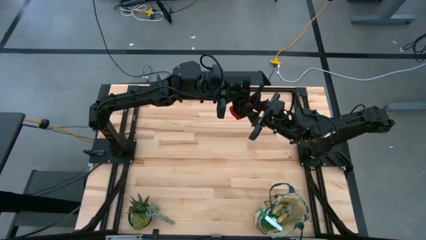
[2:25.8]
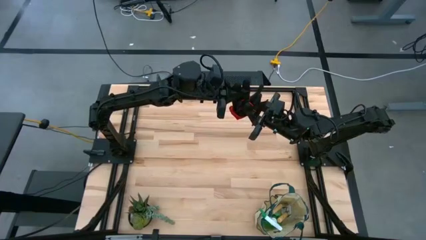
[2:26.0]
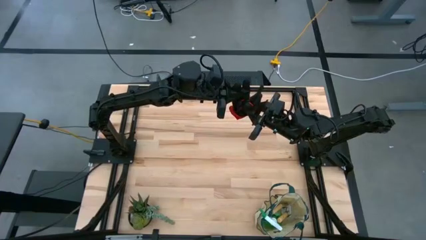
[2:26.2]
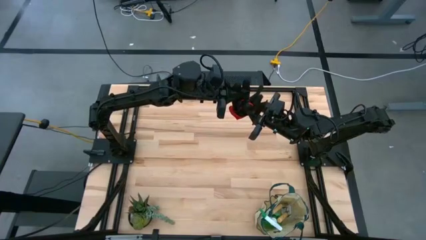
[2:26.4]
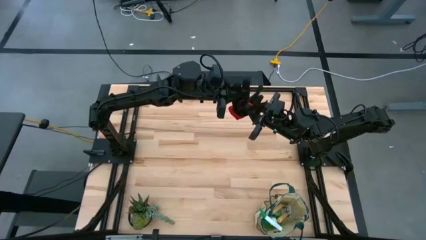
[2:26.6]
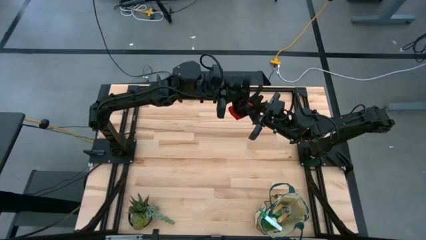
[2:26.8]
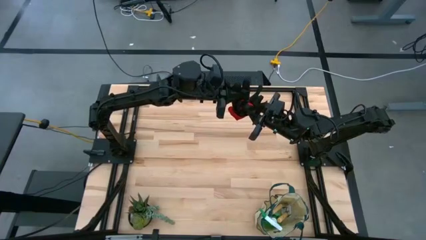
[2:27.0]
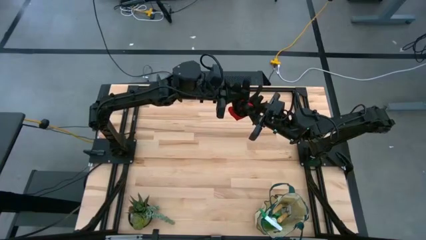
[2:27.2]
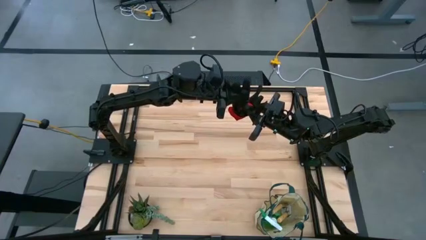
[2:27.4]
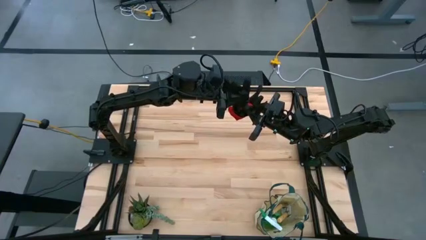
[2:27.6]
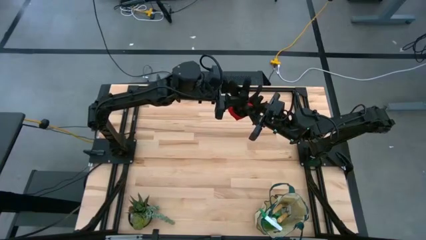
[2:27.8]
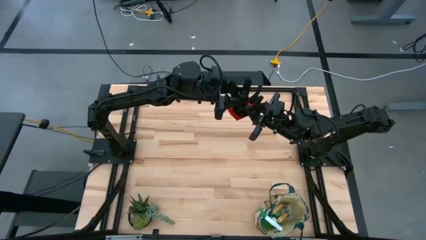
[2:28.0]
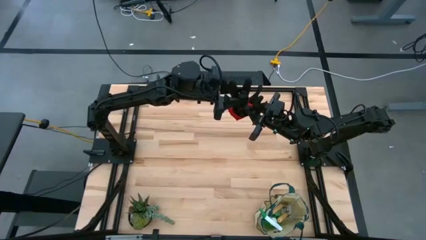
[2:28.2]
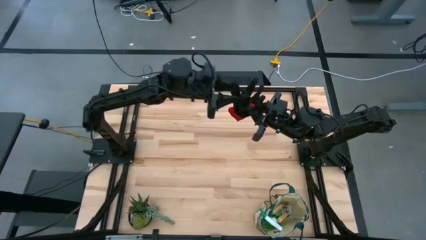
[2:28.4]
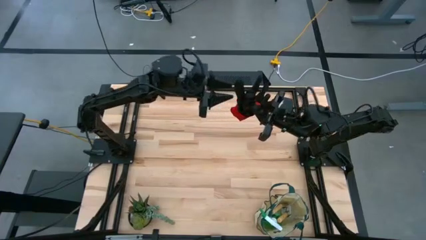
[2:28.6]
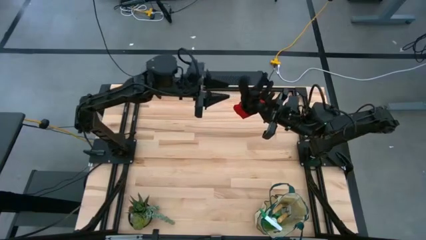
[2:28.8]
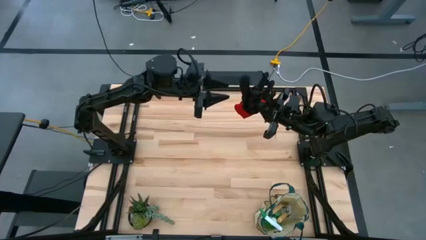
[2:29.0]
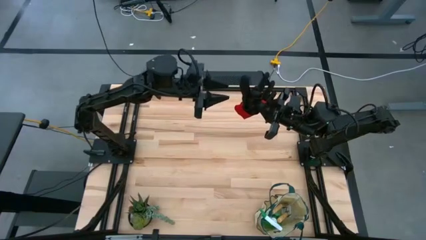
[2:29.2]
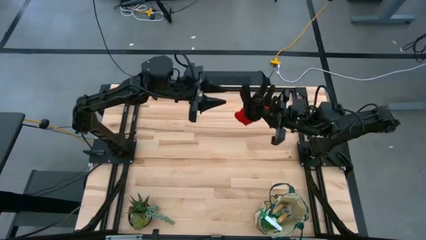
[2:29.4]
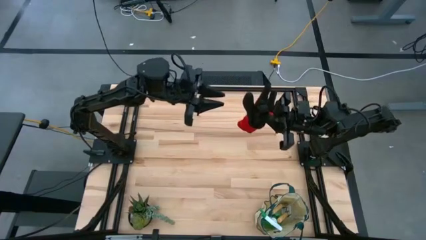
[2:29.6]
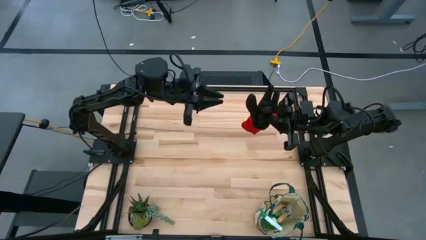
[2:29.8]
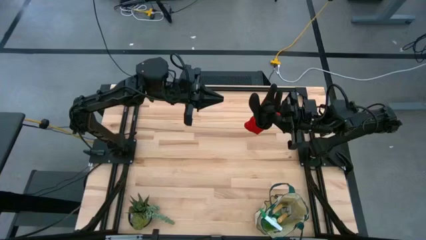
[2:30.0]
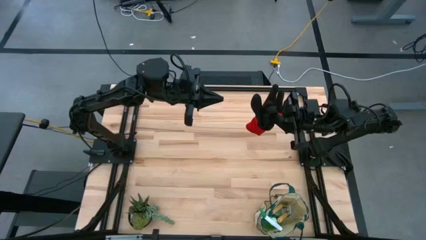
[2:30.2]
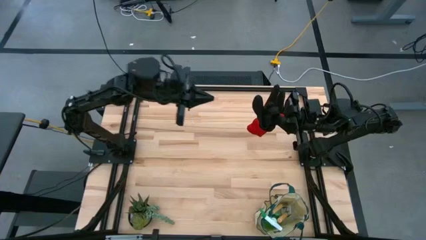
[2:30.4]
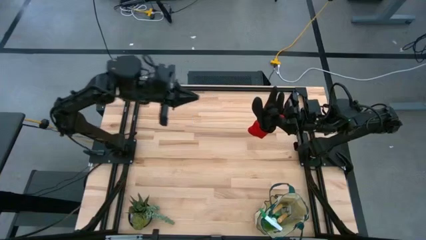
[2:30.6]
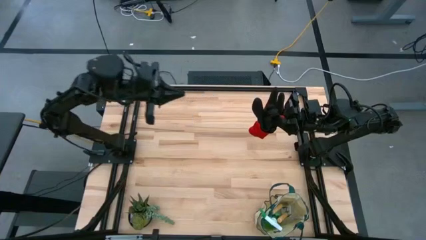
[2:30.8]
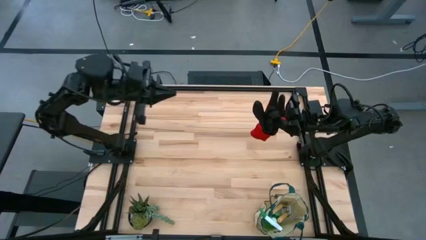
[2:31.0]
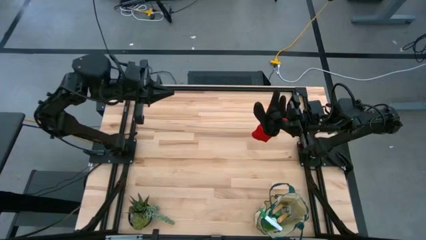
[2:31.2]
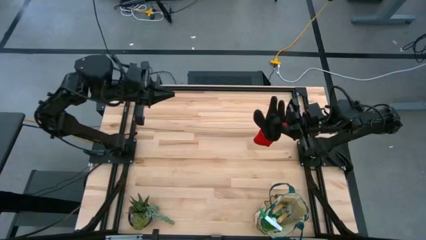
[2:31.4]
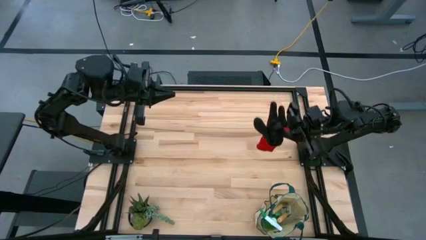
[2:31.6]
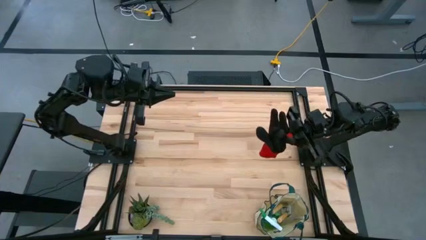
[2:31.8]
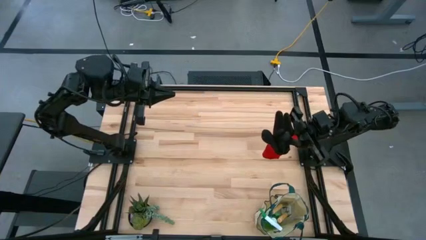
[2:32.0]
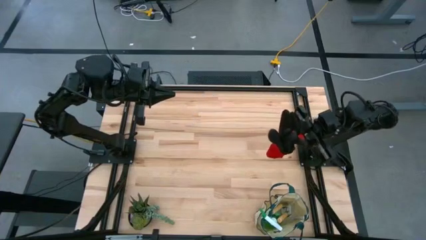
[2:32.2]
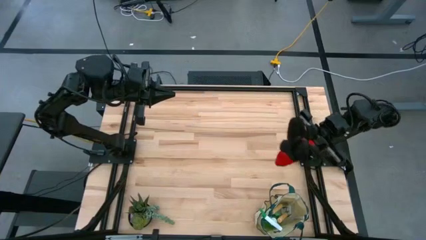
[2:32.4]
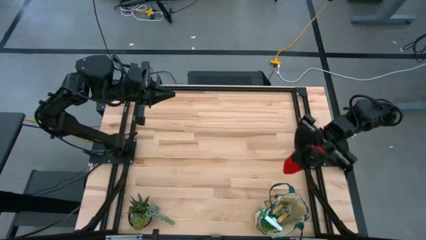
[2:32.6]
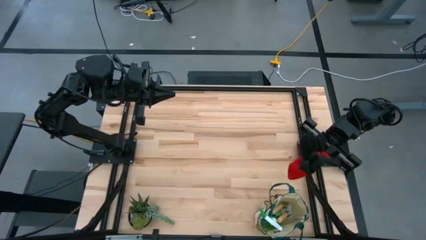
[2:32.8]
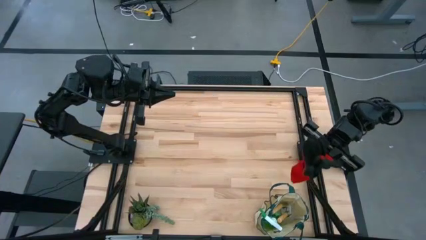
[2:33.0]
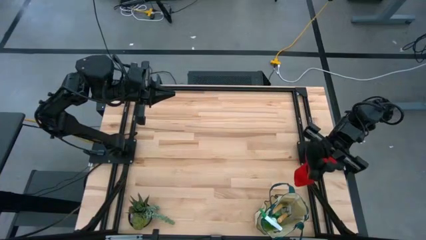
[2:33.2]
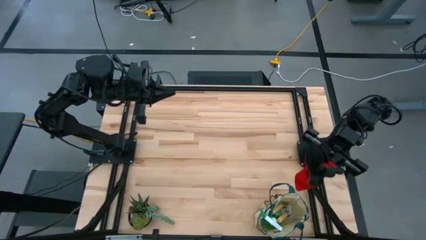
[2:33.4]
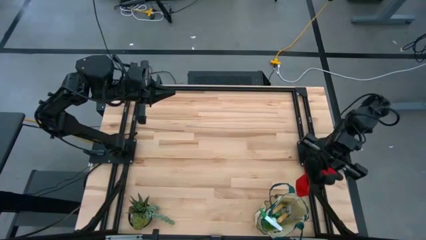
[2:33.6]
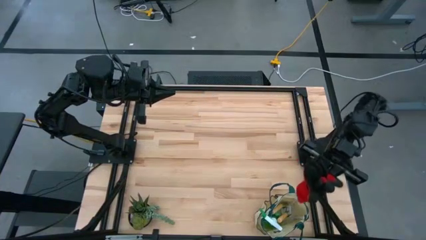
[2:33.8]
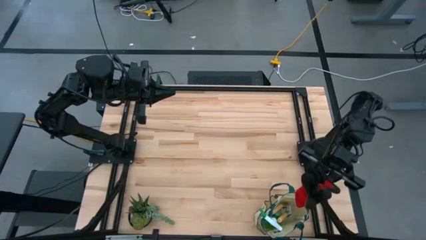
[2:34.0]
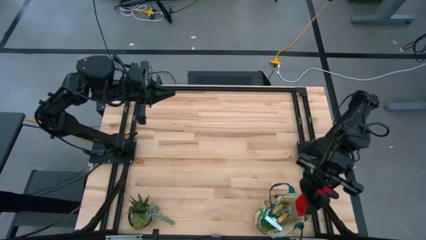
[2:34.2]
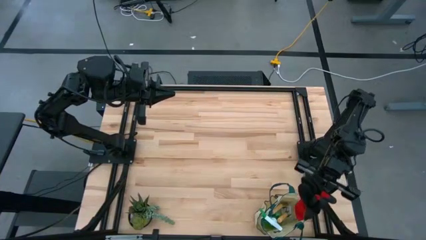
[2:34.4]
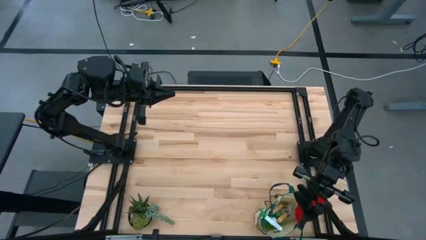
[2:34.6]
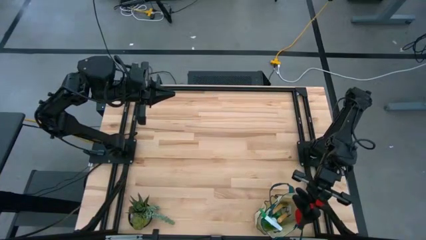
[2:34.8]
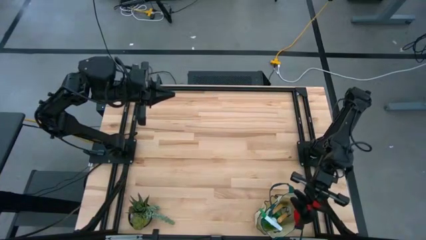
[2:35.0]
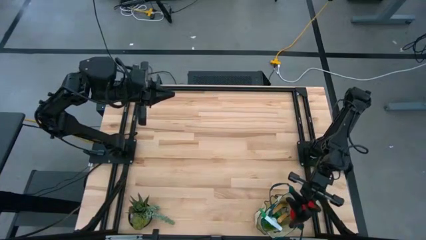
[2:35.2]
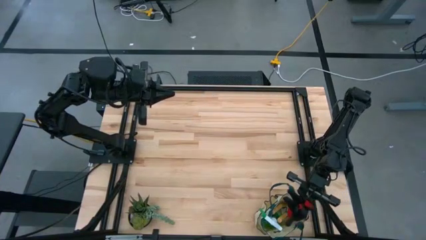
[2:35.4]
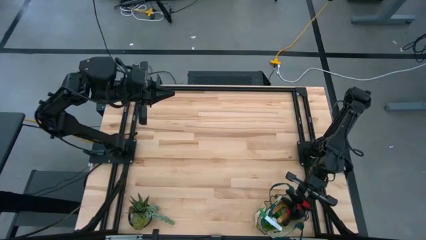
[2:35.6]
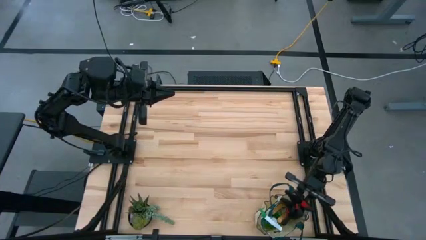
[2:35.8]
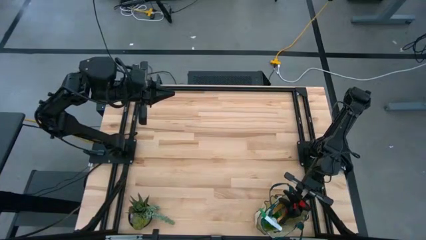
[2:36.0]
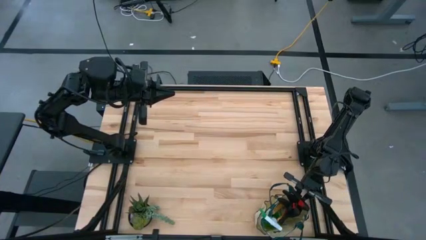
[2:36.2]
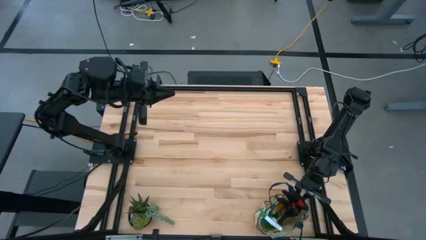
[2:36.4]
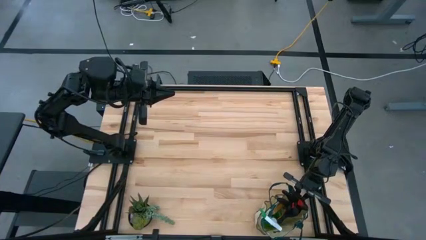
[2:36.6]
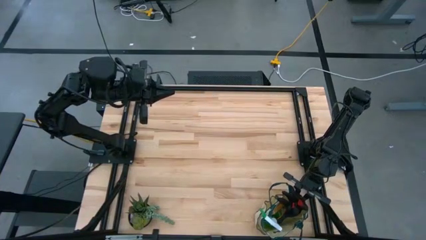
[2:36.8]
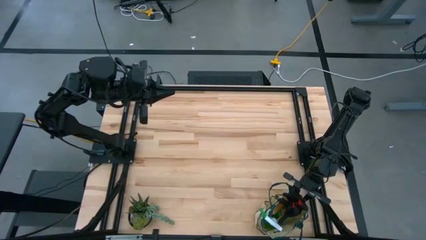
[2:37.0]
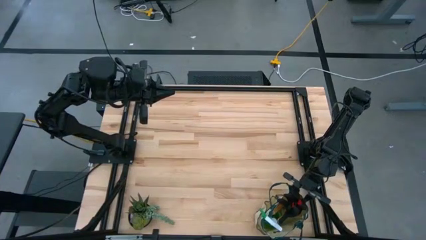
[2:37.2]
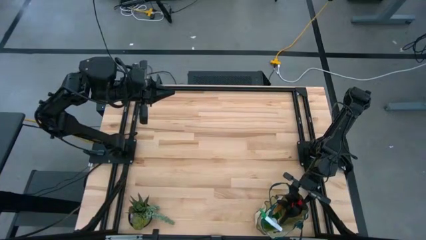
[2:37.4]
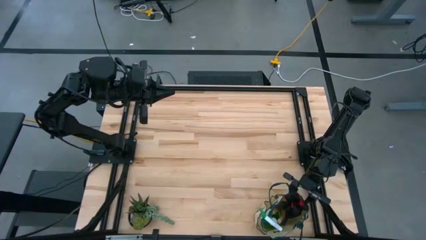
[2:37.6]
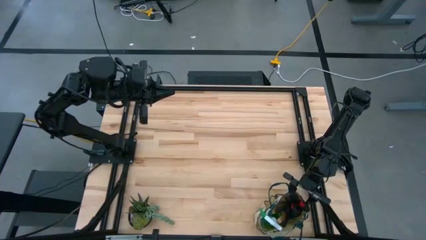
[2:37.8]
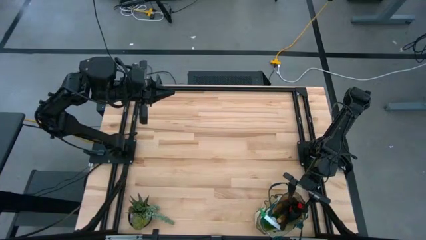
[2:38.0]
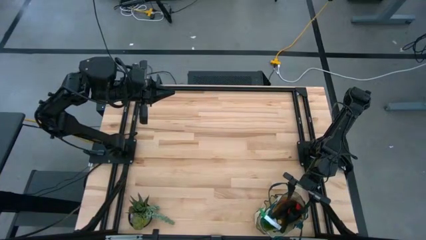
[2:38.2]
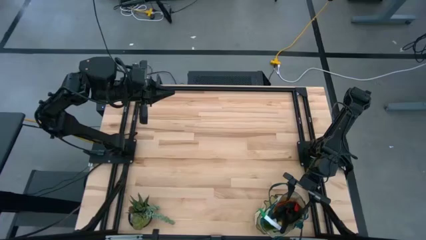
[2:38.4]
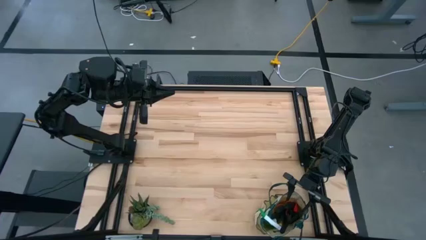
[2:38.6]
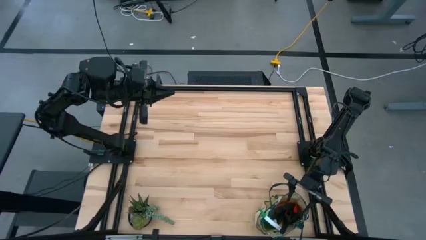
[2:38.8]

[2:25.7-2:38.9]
Task: Pick & Place Garden tools in Gardening bag
Put the black gloves into the gardening bag

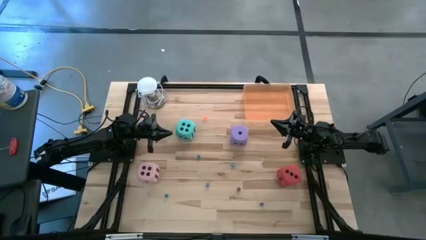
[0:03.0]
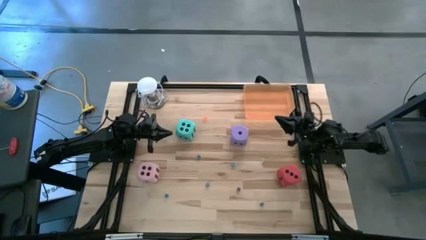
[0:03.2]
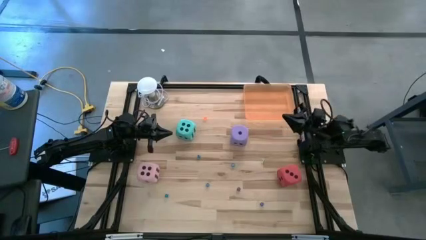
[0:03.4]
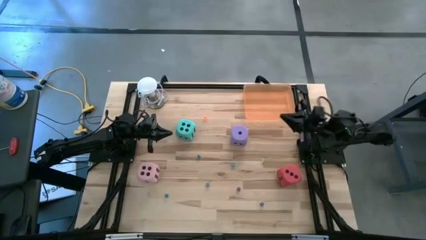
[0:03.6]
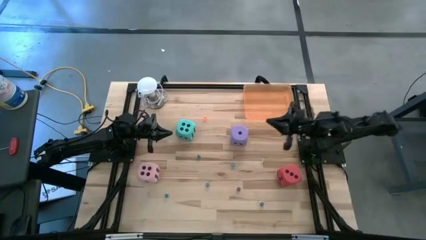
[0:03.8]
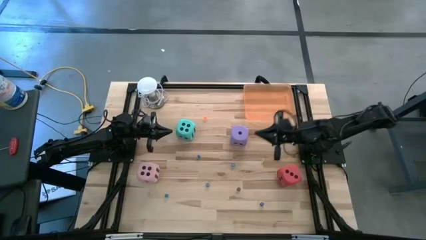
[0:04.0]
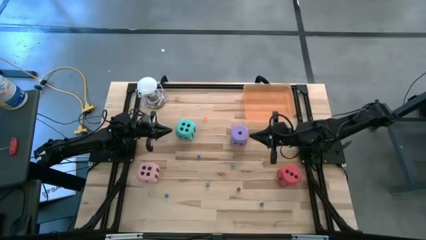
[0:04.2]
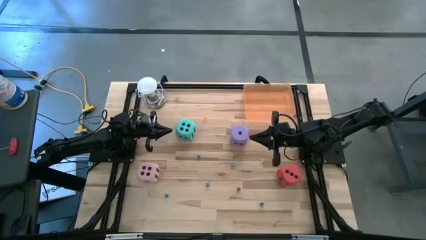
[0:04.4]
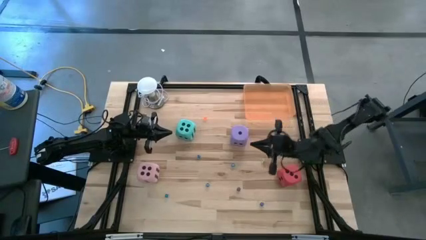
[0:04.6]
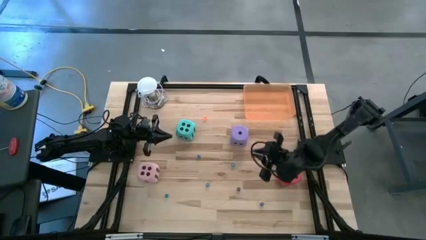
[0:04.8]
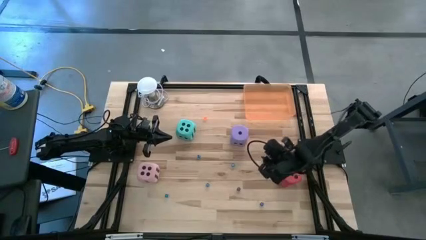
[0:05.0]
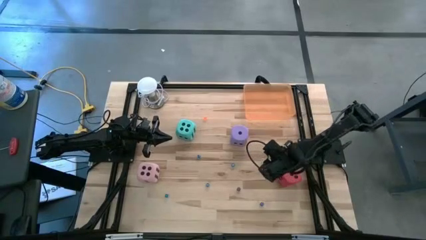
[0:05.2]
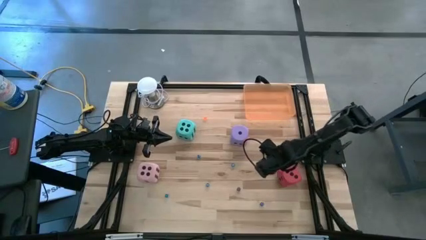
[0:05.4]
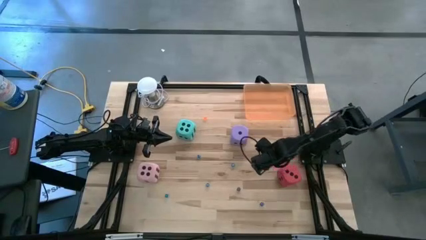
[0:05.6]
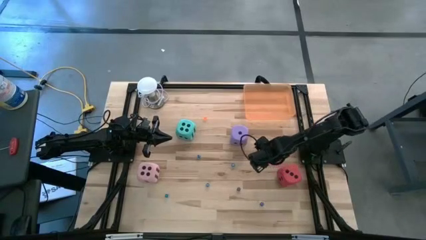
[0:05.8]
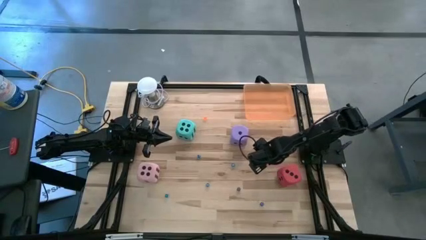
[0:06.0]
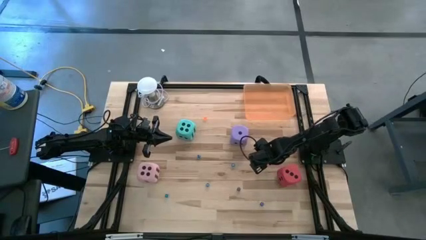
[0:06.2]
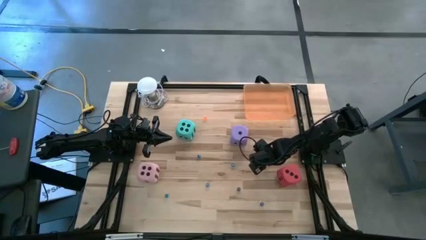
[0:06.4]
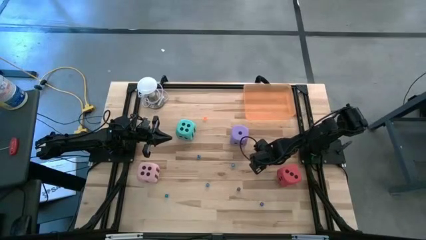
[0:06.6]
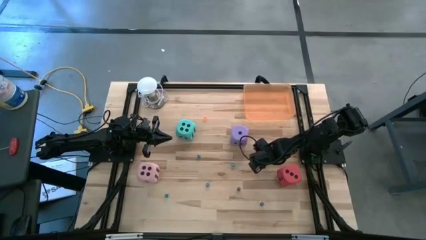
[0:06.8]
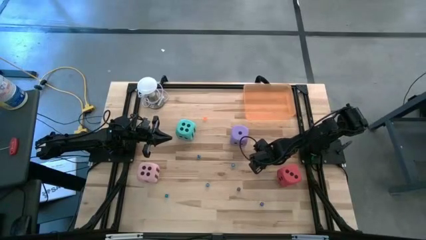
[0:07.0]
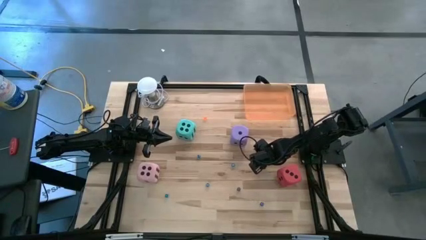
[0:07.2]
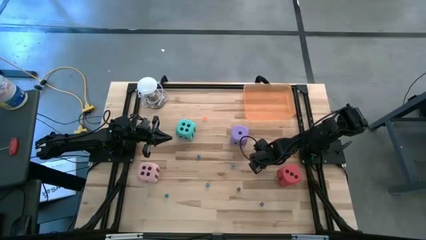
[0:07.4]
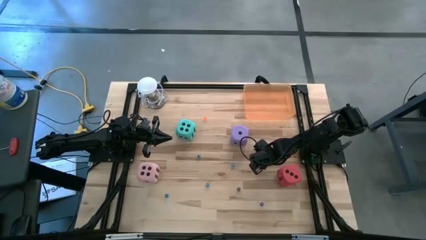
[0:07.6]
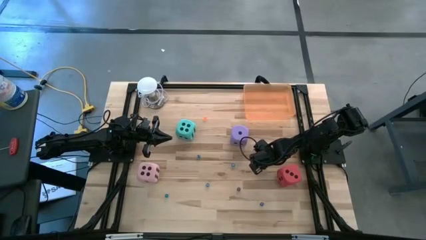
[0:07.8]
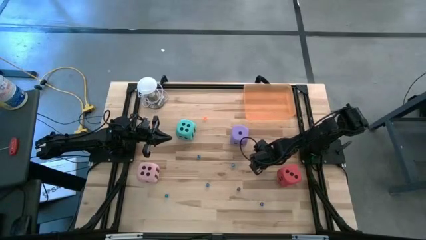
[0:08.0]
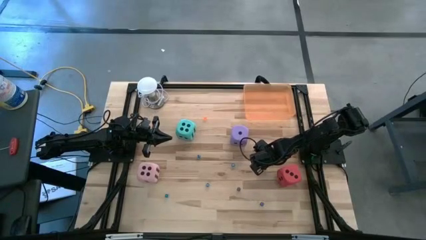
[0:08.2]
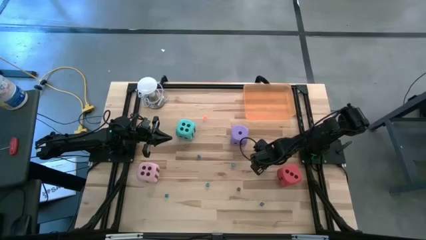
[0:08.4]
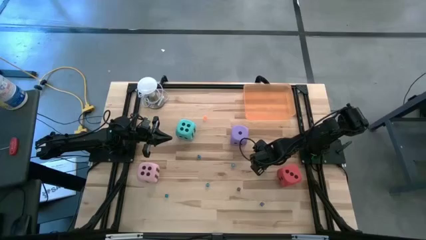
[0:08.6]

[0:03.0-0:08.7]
Task: Pick & Place Dice
Put the small light green die into the orange bin
